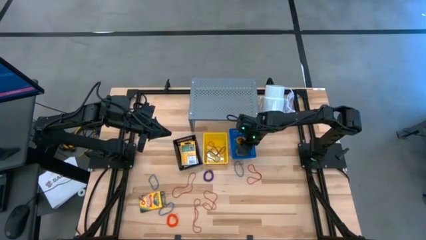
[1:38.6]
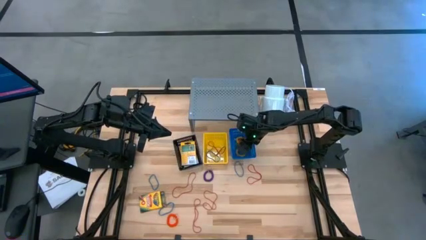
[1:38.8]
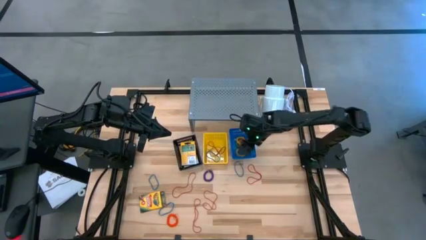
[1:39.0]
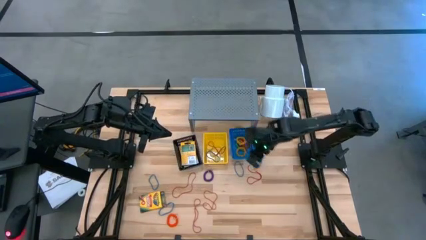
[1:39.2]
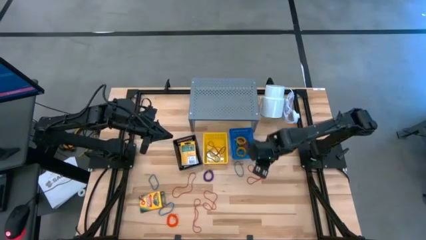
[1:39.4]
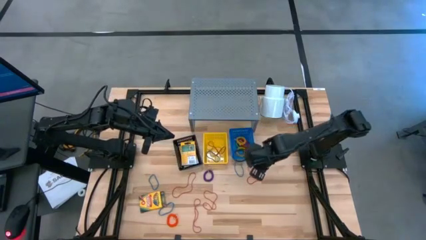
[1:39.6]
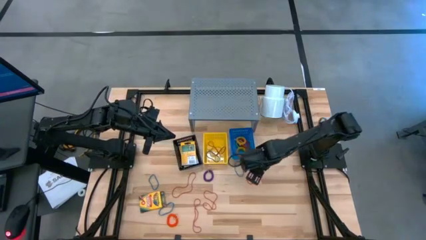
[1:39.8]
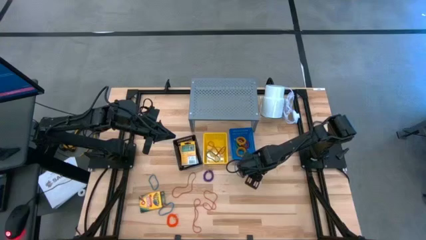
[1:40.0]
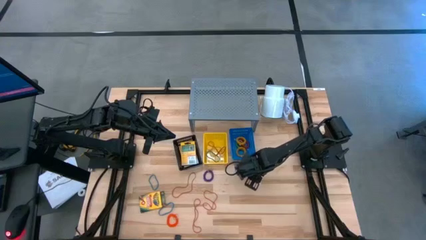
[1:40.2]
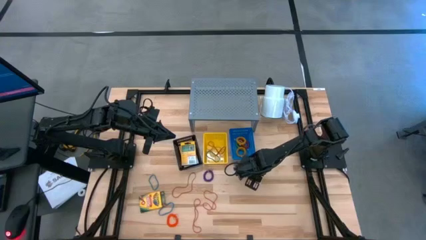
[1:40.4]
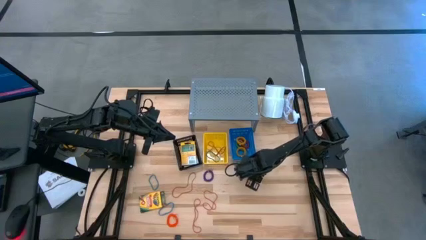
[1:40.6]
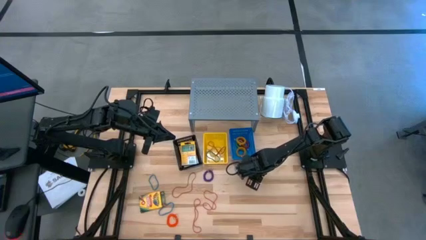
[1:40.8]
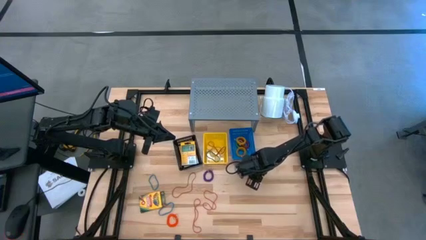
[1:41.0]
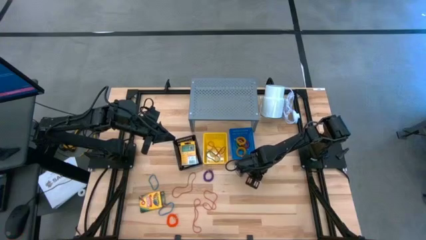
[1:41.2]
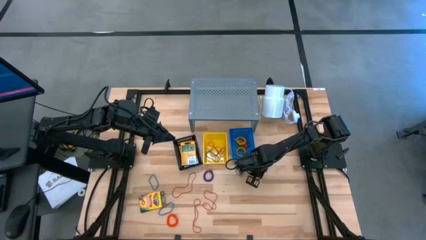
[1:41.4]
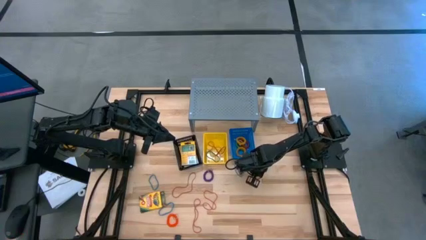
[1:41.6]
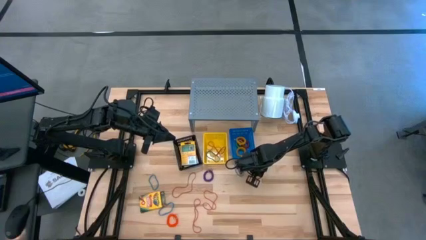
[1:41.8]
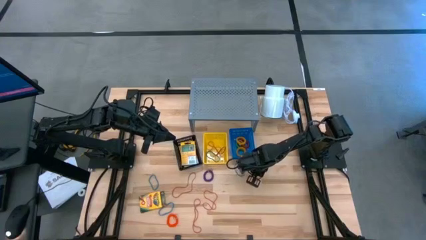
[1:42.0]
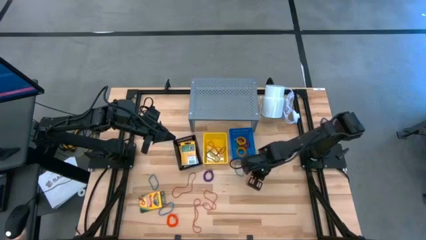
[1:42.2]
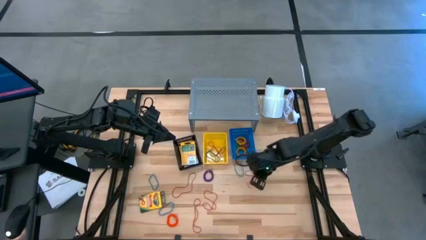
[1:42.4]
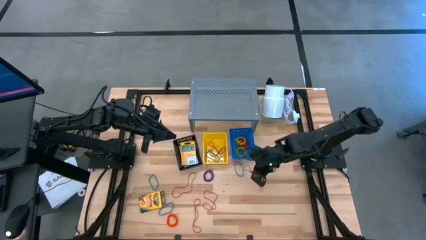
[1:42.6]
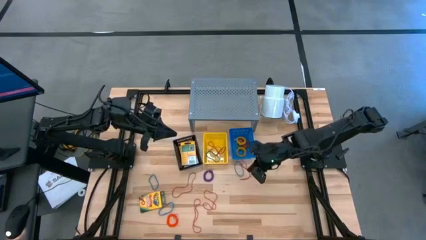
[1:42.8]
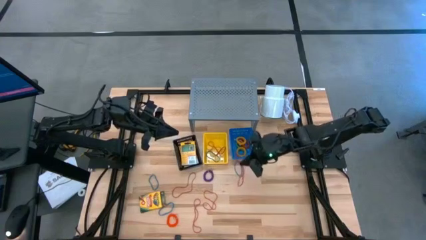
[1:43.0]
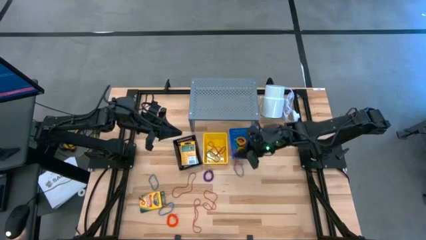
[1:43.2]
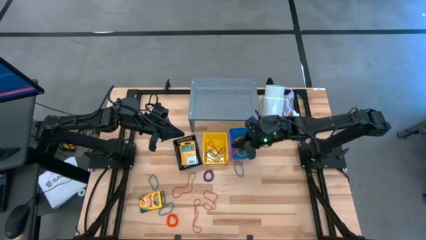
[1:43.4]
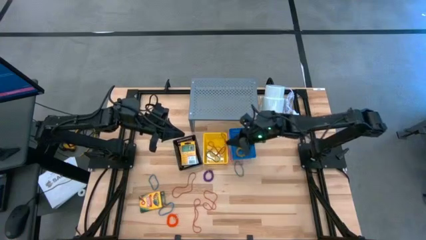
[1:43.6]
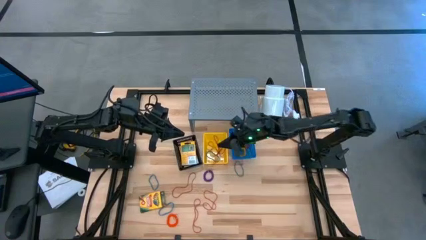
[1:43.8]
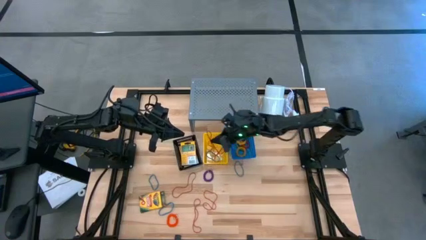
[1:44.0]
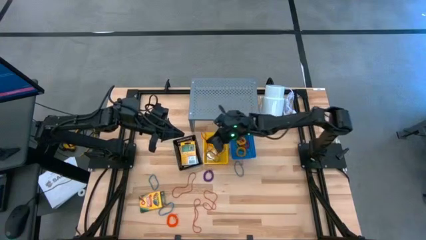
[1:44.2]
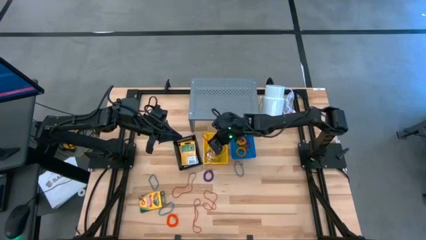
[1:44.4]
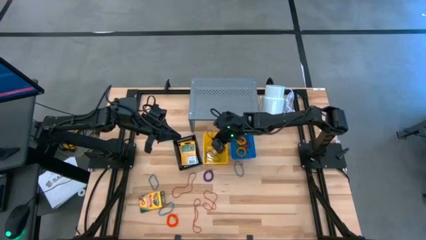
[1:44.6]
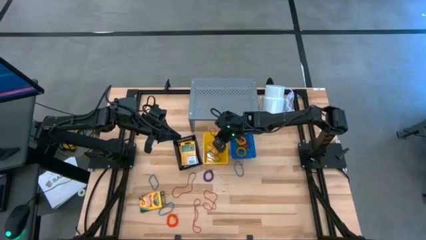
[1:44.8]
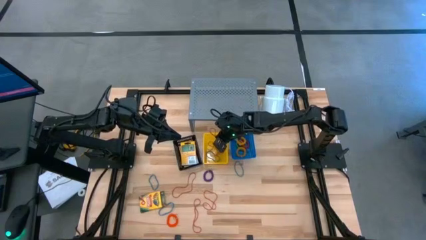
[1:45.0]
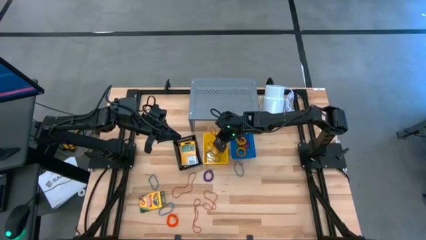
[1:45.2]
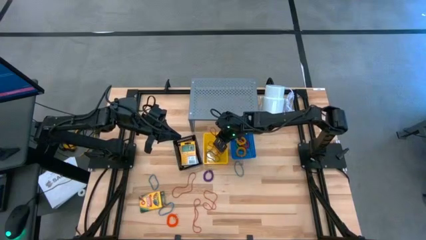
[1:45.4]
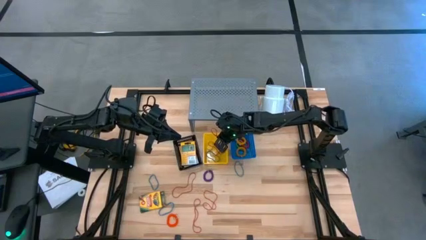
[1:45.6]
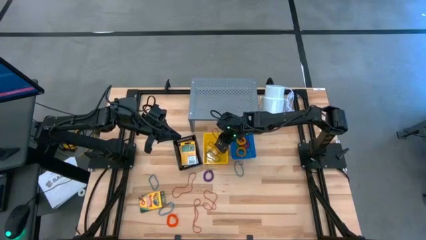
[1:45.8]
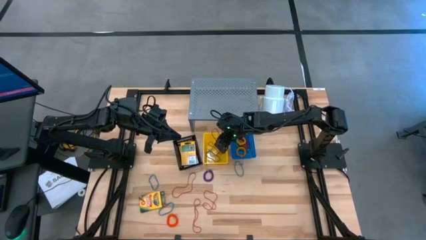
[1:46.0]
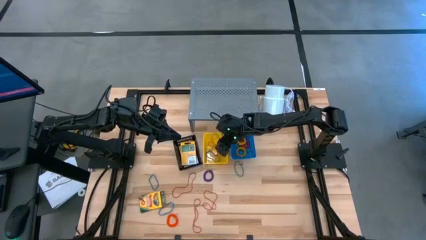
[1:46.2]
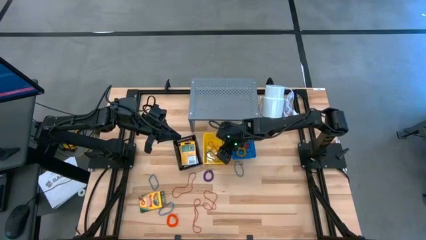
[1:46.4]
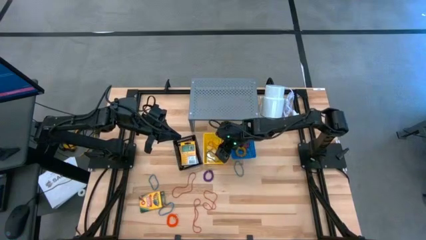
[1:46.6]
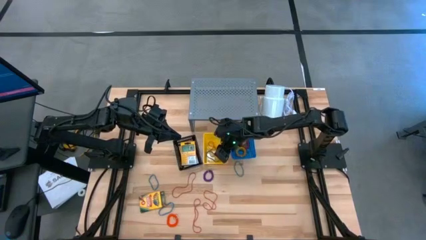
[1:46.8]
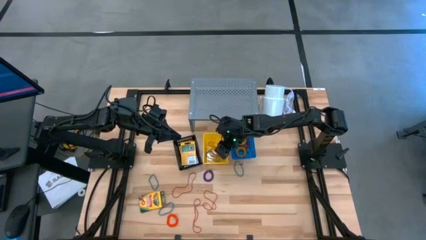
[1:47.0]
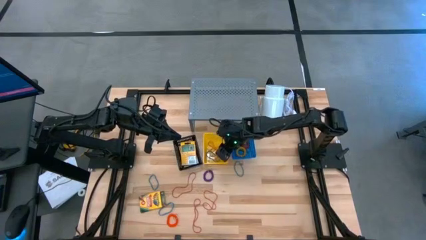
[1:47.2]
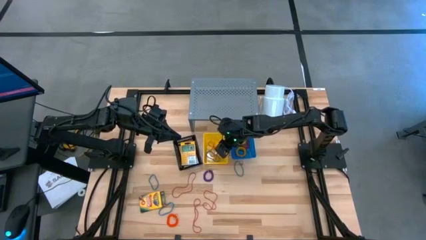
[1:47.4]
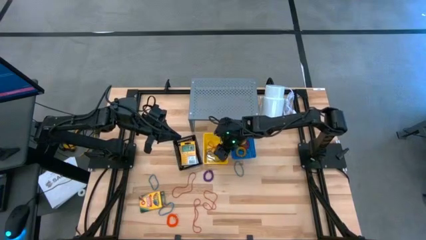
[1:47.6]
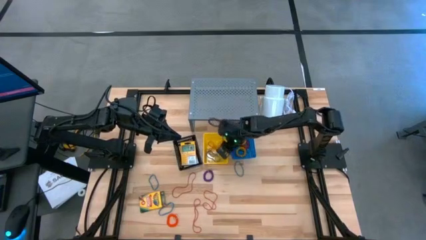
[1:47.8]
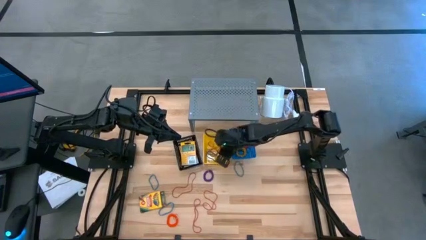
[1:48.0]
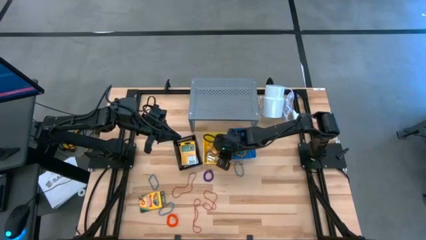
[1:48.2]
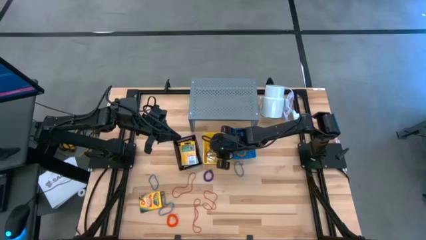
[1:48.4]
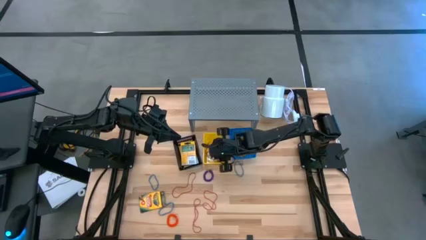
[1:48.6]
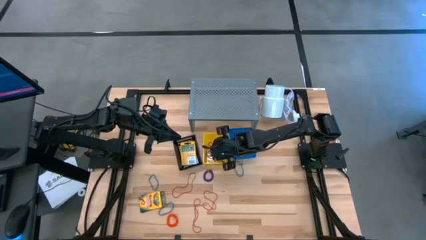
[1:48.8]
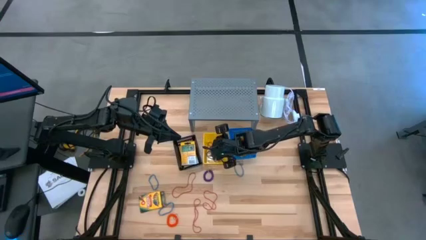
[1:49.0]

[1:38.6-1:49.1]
Task: Pick & Place Office Desk Supplies
Put the red rubber band into the yellow basket

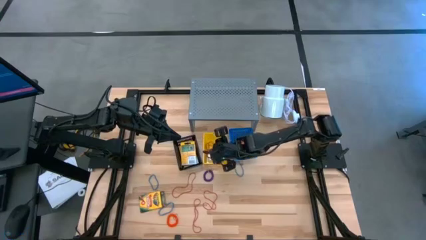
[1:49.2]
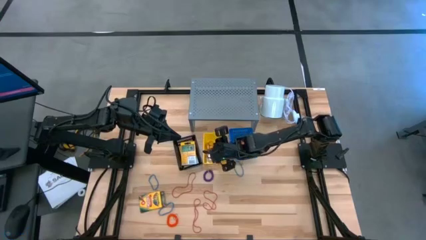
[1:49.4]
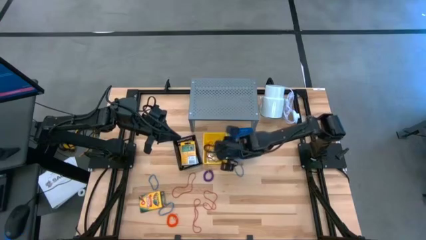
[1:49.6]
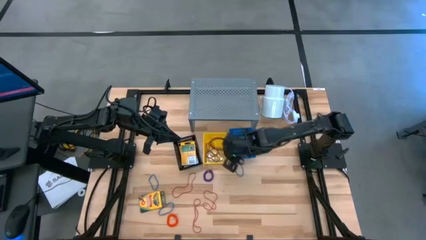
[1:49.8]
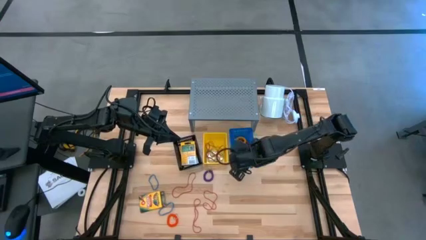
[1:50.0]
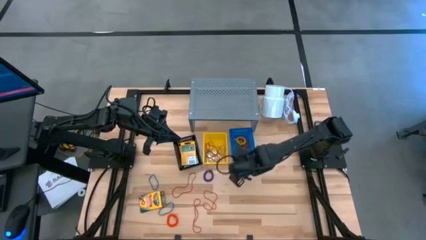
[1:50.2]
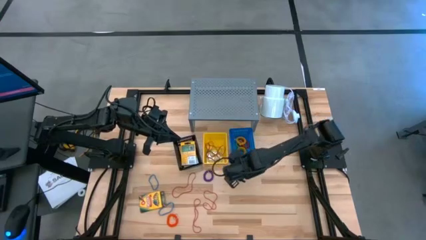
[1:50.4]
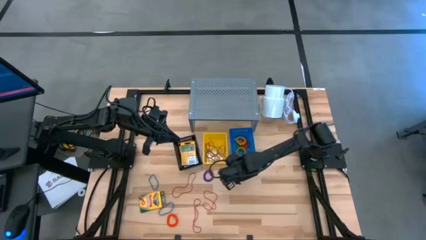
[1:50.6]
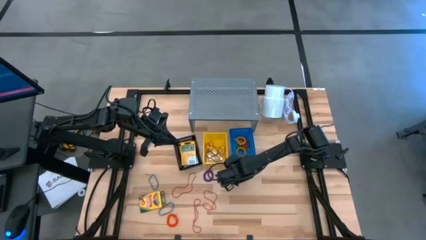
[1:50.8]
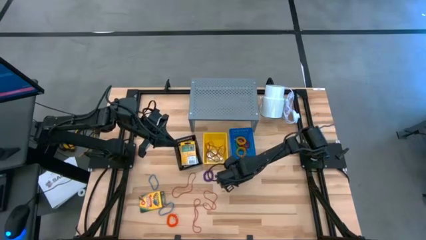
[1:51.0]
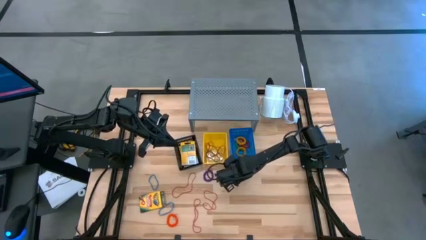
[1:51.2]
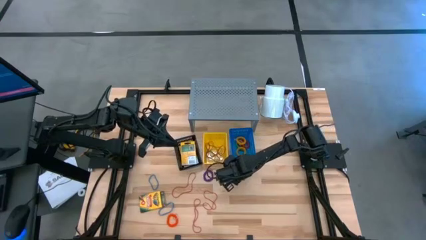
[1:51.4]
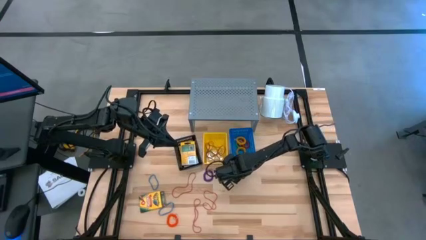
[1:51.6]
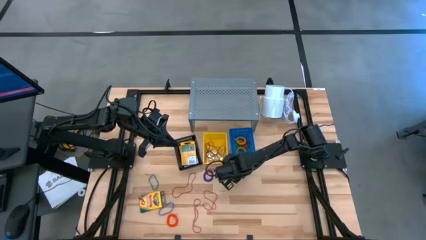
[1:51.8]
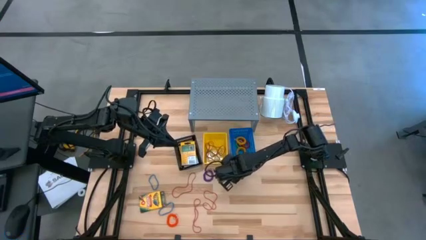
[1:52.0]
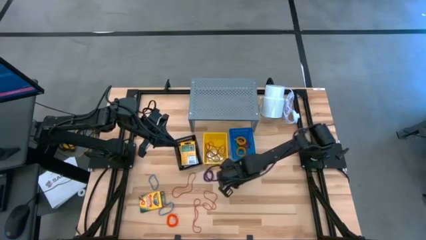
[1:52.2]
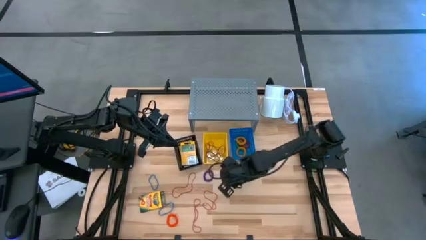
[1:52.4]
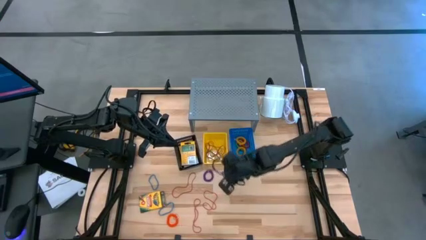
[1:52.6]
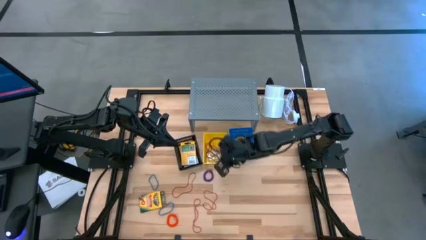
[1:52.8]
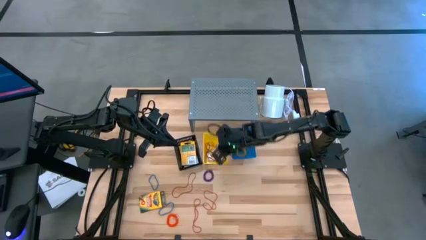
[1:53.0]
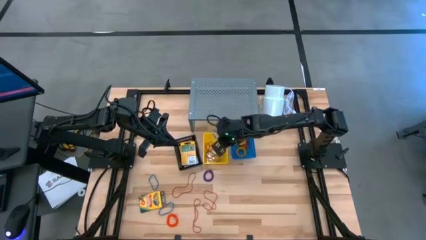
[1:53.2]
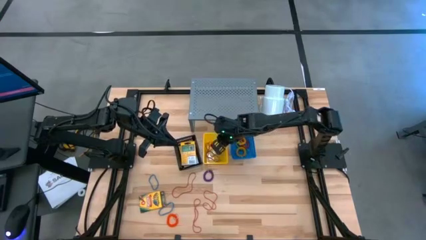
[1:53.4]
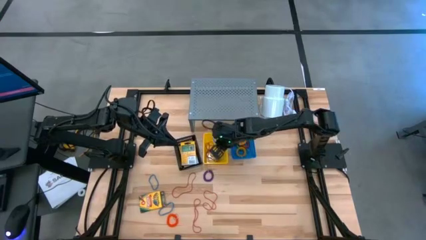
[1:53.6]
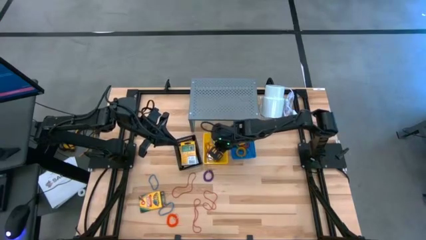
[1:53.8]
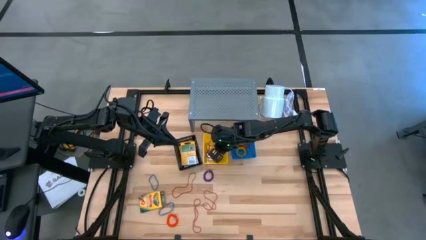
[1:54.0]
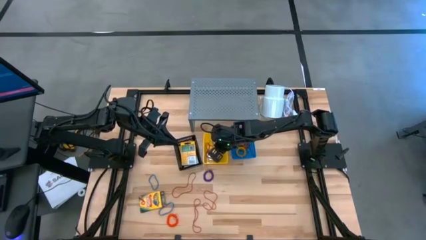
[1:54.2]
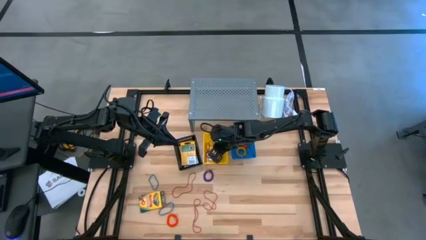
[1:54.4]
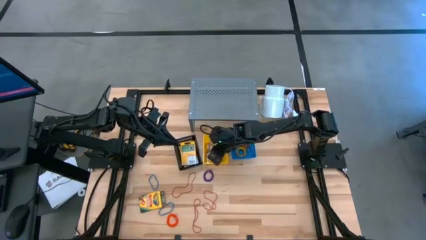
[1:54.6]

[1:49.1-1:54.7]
Put the blue rubber band into the yellow basket

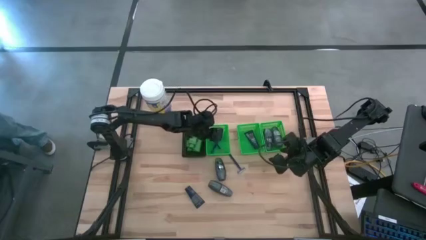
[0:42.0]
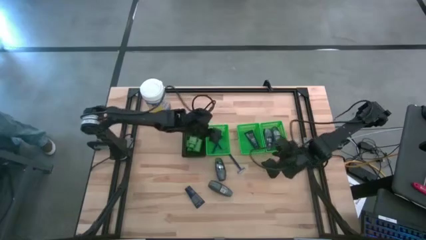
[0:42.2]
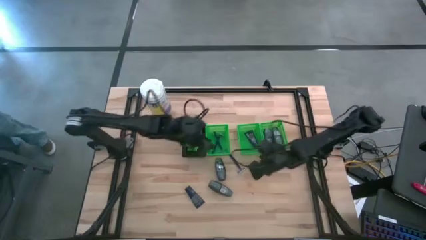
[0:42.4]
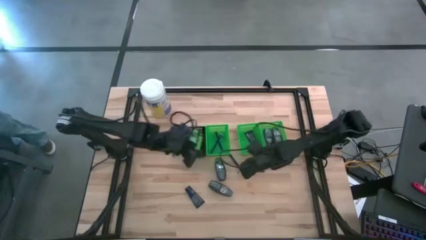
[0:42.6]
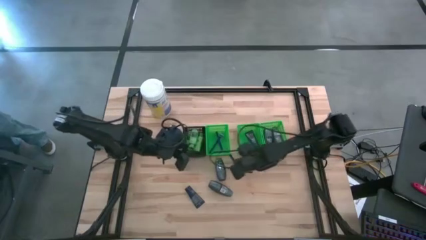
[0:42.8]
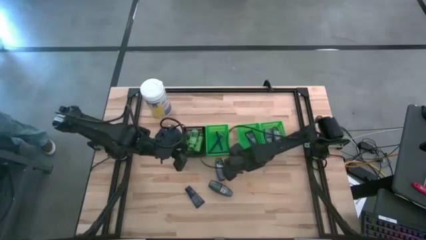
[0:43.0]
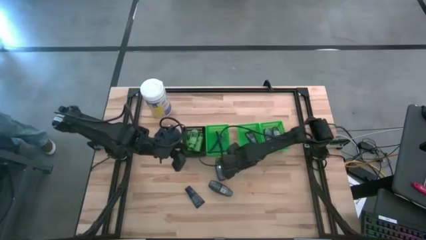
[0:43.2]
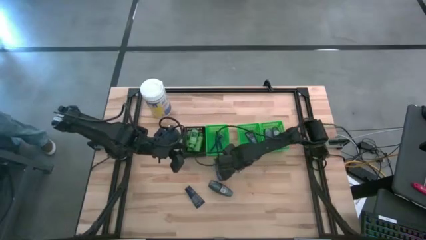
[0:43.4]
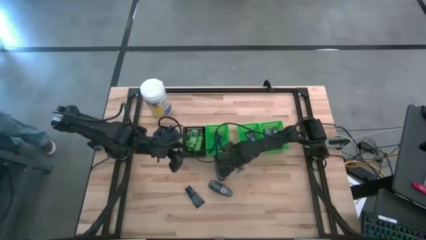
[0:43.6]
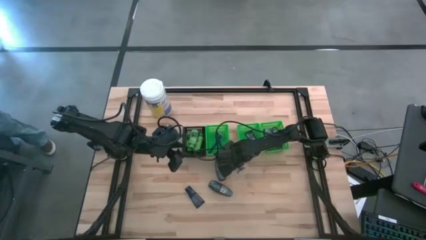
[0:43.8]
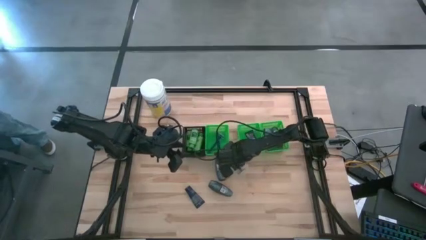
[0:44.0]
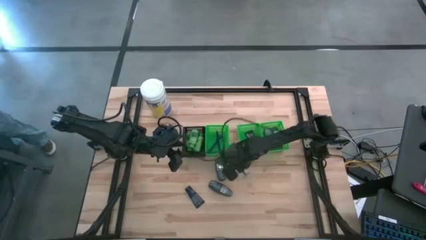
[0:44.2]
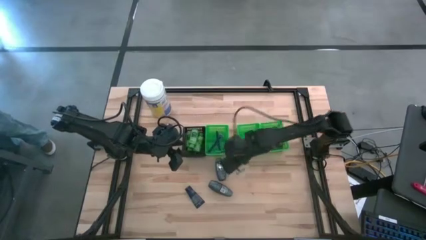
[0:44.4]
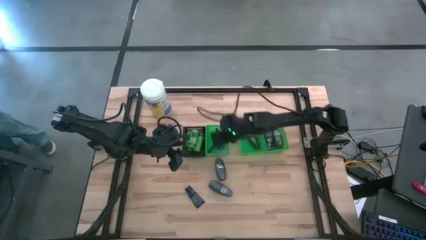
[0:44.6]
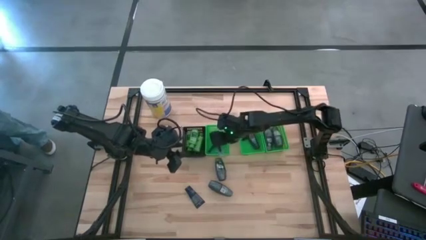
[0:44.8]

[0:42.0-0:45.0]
Task: Pick & Place Travel size toiletries
Put the blue razor into the left green bin
